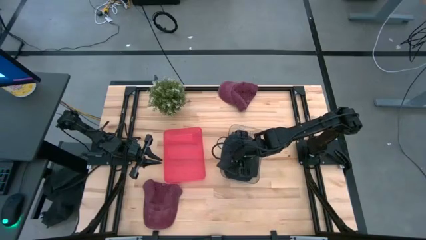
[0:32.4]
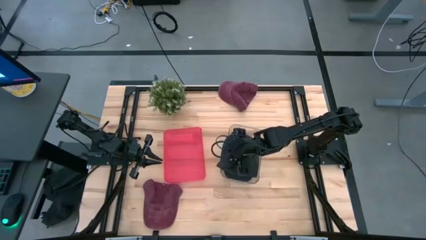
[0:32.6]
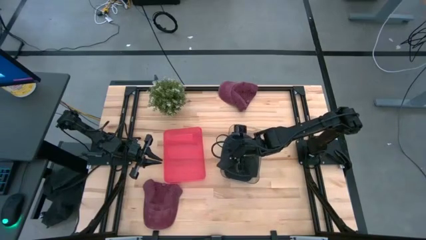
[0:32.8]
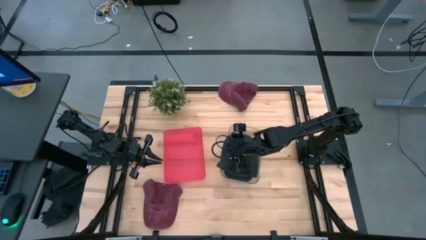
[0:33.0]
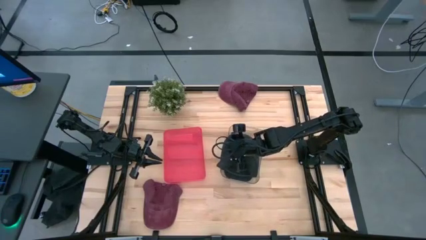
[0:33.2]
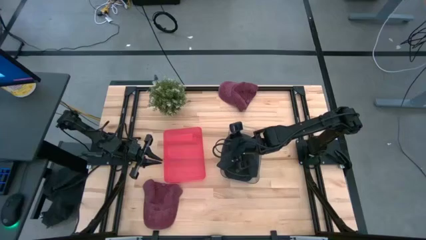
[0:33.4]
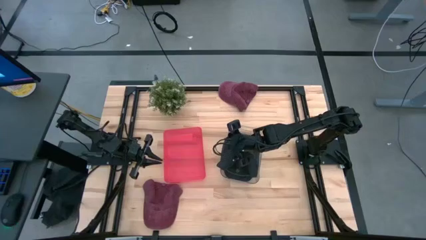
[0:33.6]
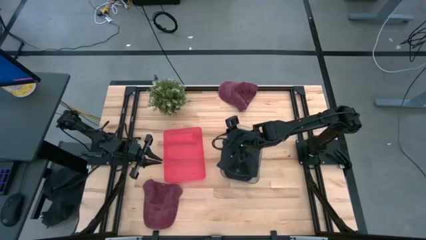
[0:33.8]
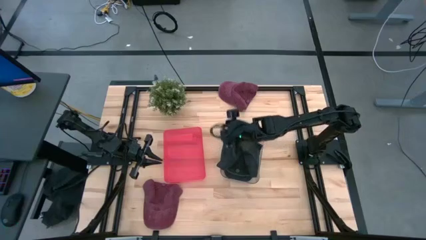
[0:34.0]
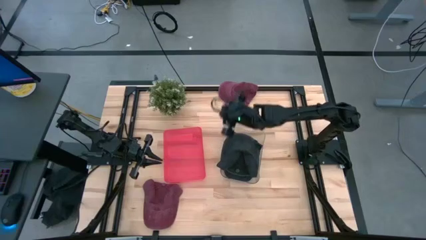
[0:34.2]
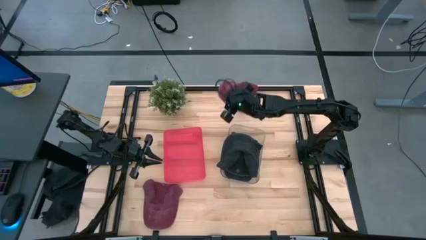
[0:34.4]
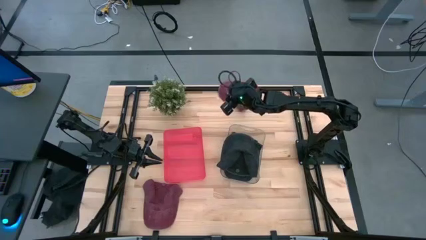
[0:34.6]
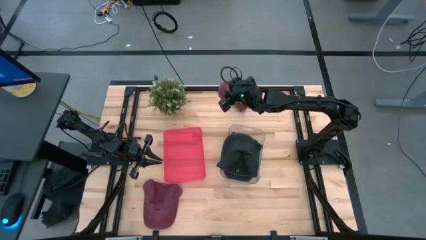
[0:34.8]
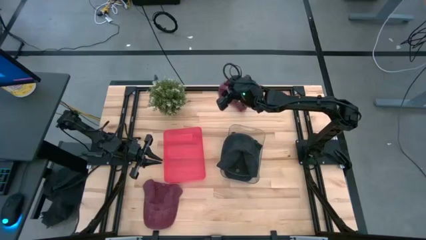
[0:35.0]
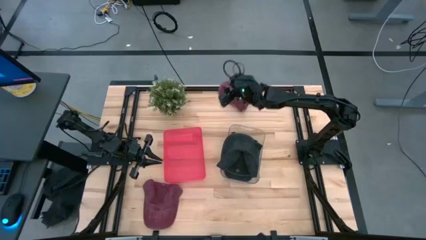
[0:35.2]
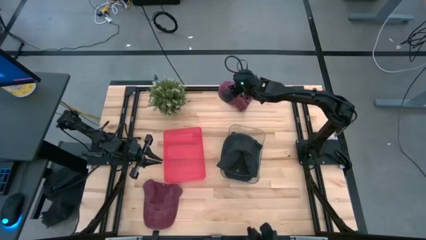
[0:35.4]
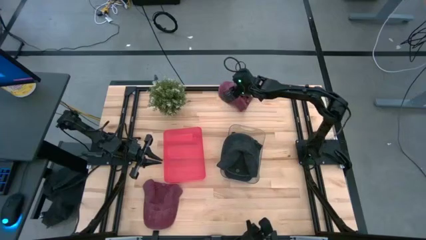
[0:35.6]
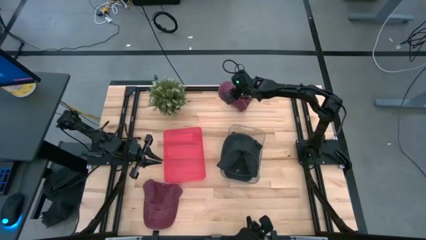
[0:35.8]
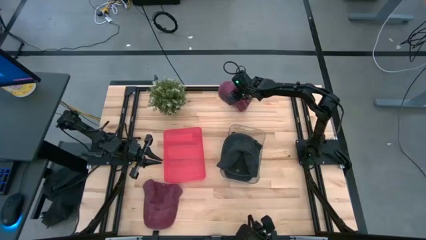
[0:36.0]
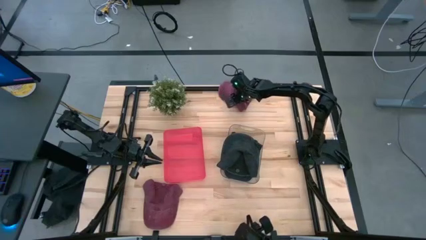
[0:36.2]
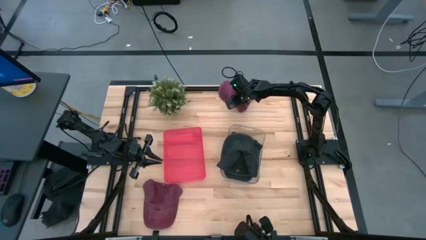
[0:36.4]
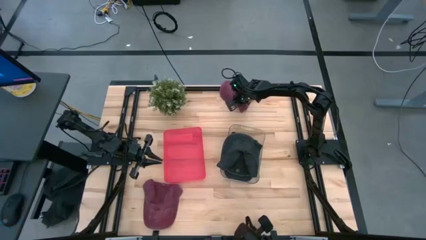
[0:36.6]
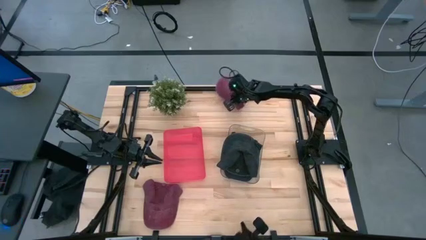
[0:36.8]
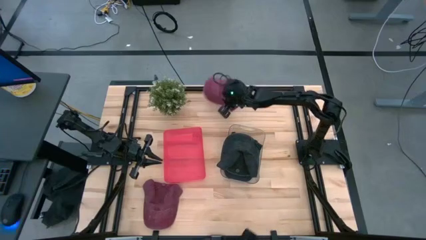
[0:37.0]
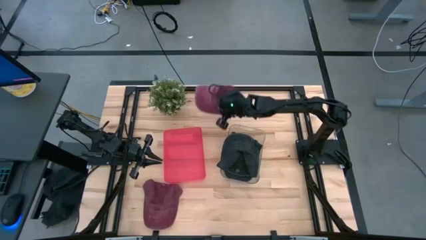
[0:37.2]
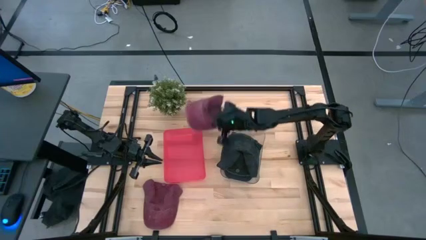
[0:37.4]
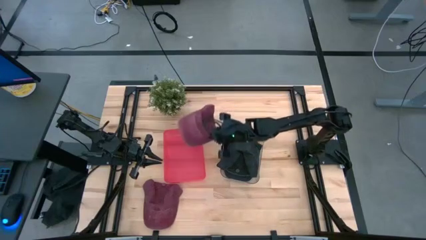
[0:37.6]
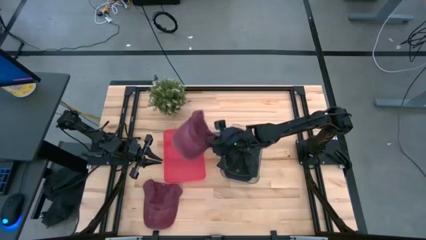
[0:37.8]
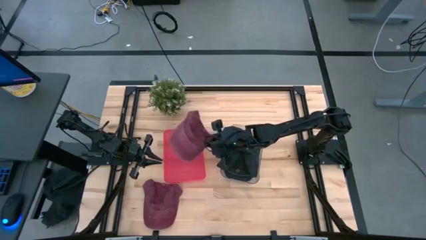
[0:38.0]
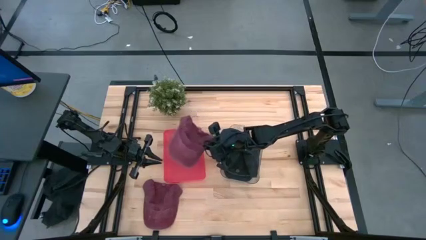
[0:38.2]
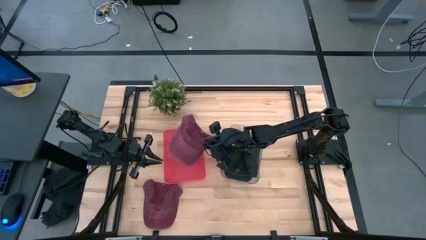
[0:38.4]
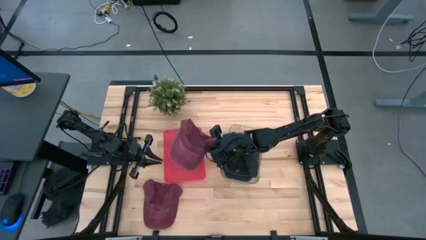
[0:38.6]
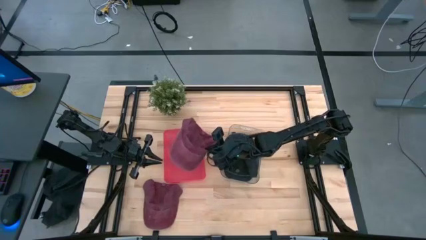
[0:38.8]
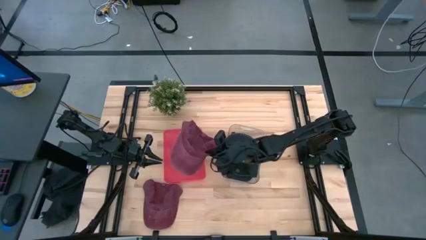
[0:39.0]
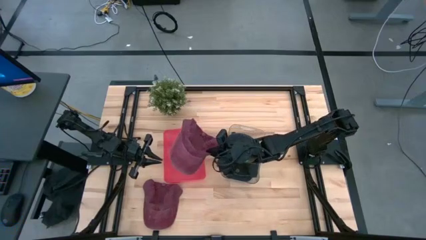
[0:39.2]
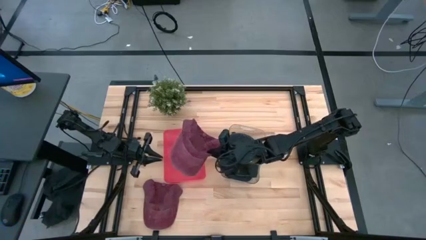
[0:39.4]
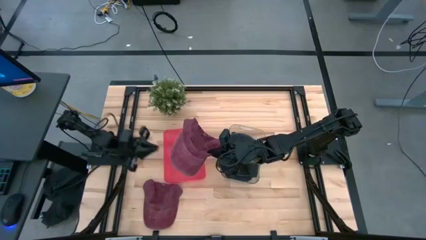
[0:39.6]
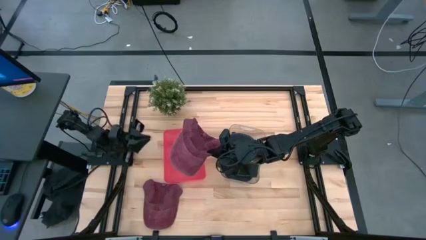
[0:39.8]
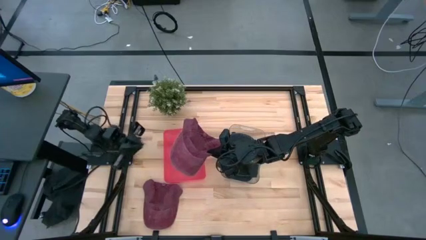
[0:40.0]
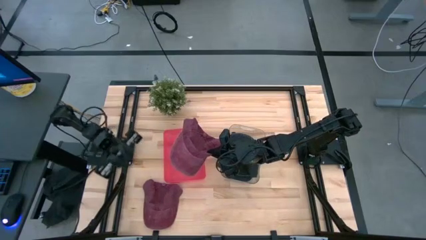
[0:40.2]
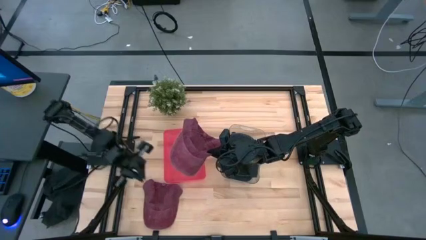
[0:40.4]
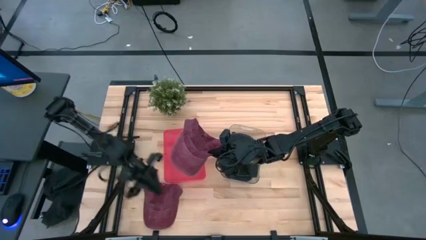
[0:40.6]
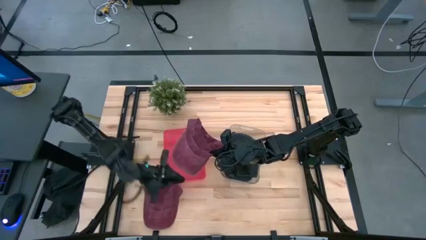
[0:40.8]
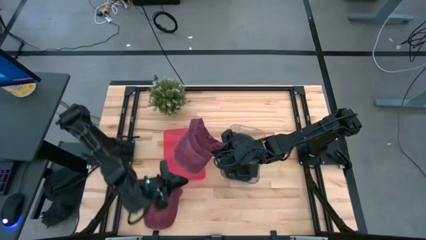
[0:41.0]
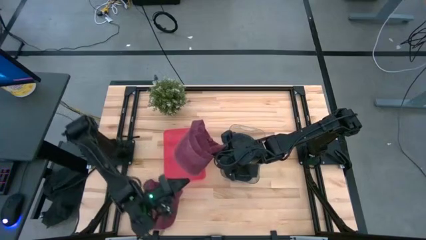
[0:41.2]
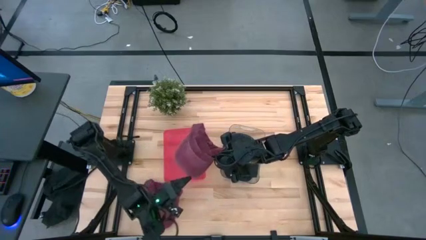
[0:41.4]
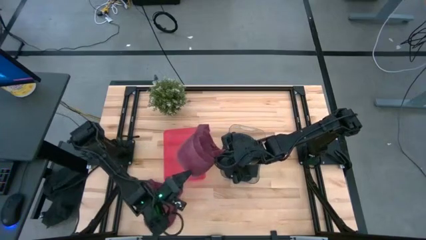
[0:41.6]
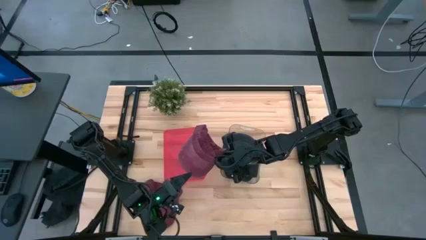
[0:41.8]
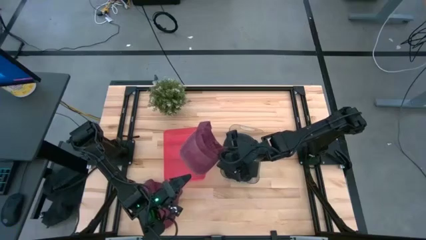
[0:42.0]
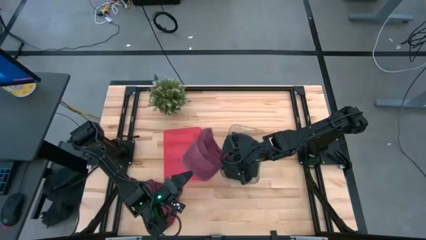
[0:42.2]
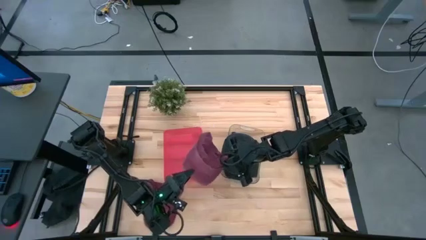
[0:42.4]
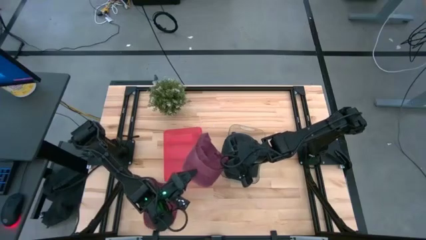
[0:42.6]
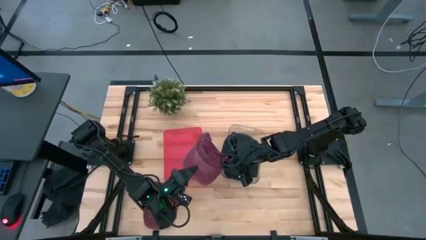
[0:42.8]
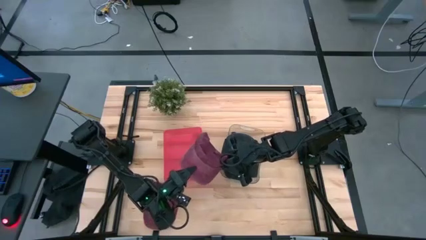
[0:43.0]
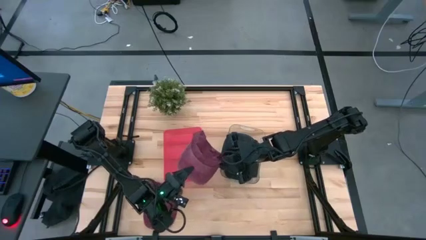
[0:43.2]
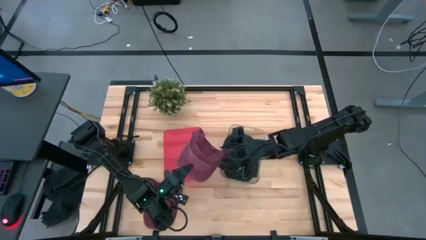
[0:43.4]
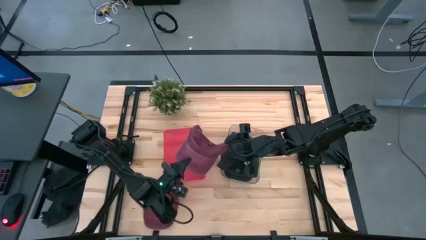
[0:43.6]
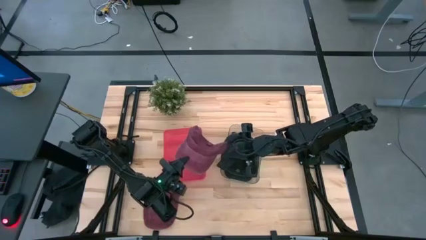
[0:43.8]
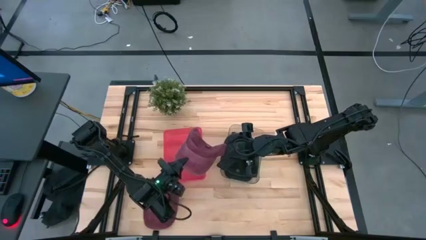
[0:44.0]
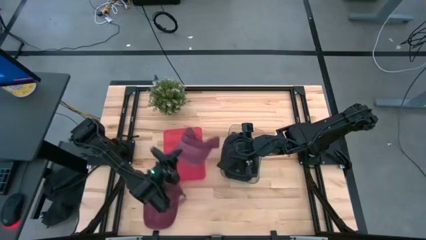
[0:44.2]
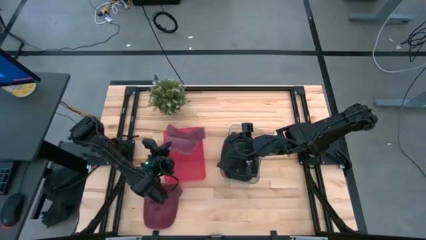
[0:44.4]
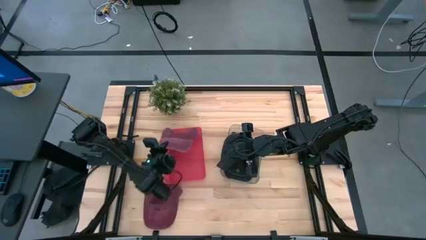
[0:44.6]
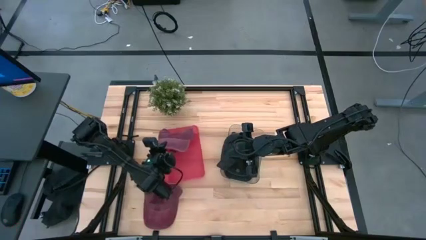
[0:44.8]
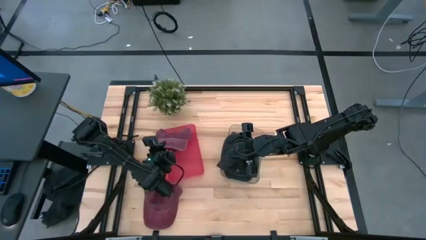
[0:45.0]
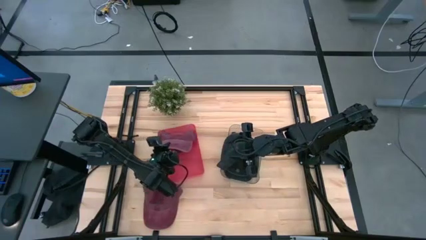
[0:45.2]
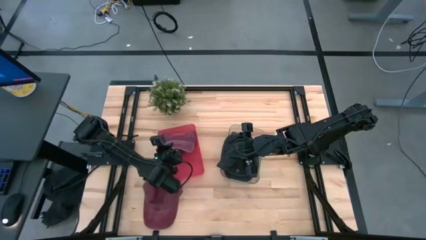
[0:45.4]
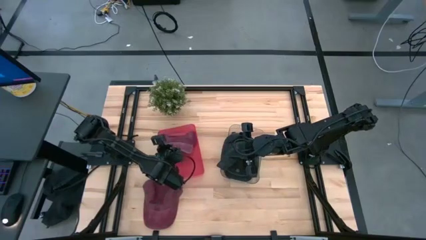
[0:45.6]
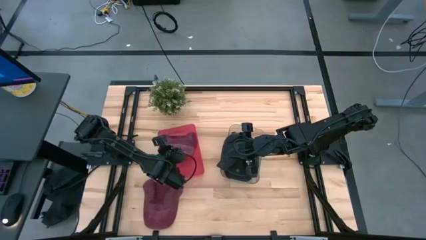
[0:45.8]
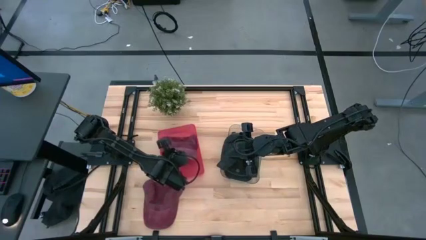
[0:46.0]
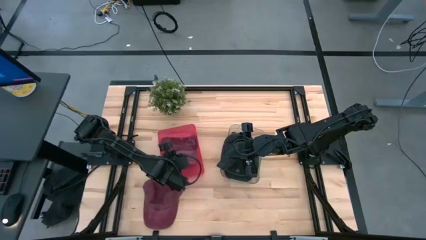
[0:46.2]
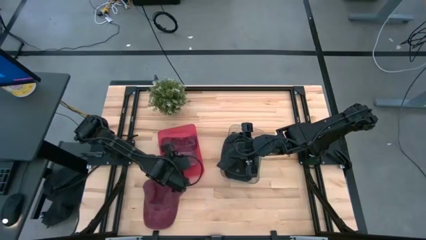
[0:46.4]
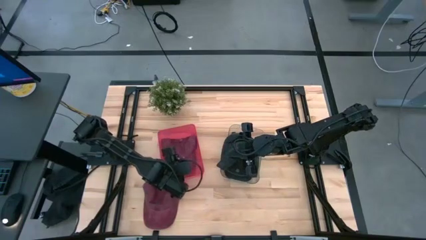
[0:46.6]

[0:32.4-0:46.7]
Task: Pick & Place hat
Put the top maroon cap into the red bin

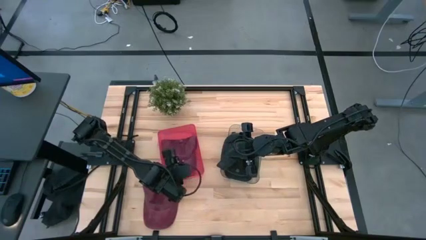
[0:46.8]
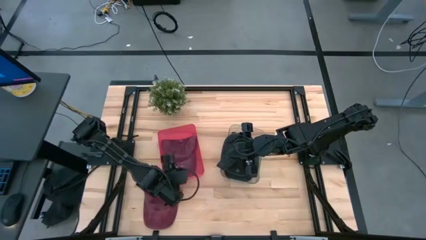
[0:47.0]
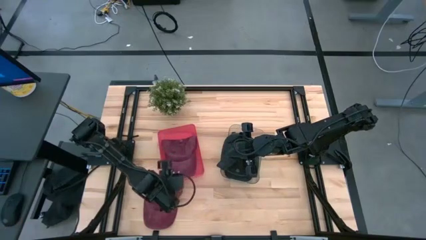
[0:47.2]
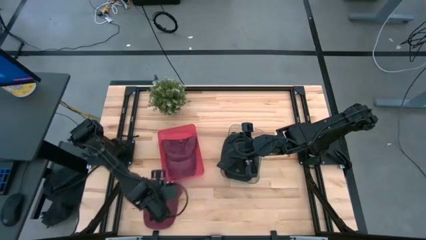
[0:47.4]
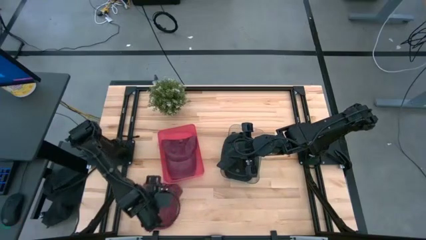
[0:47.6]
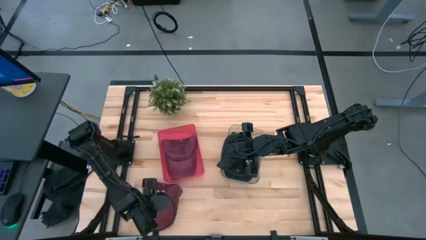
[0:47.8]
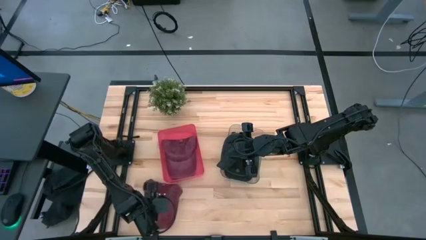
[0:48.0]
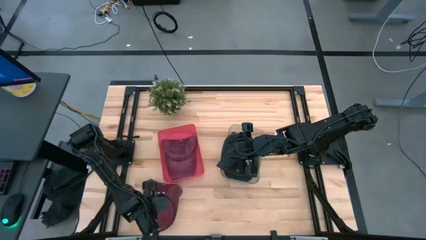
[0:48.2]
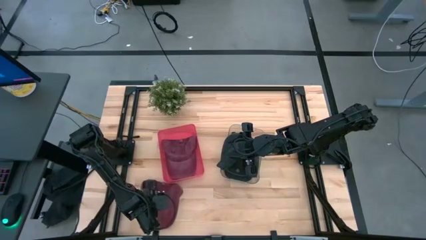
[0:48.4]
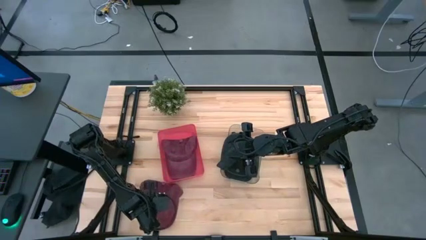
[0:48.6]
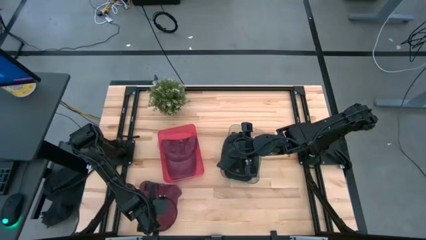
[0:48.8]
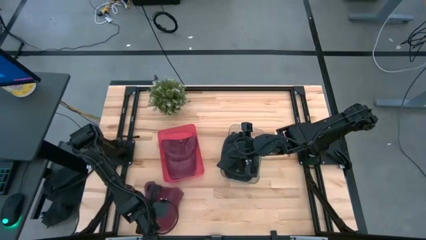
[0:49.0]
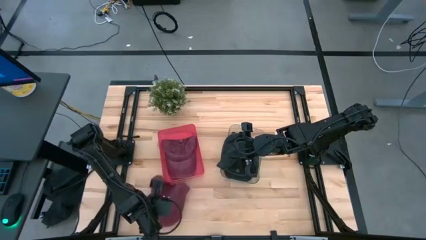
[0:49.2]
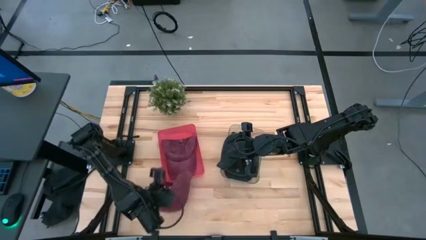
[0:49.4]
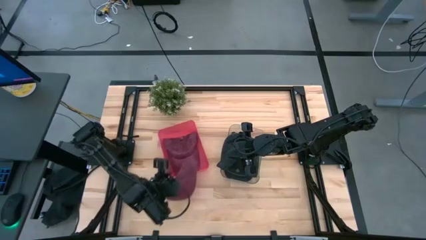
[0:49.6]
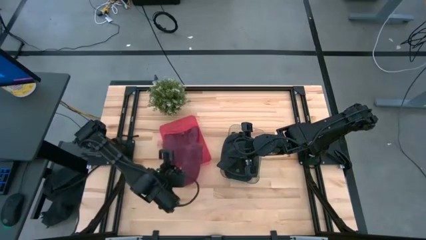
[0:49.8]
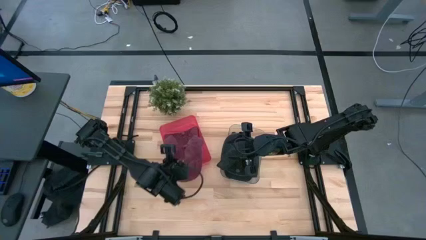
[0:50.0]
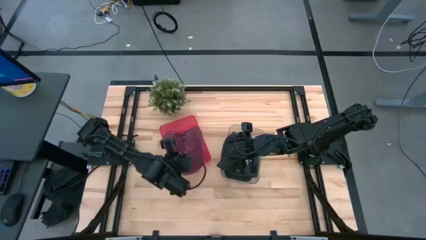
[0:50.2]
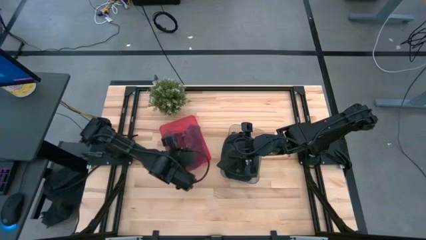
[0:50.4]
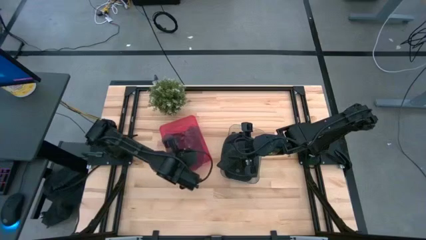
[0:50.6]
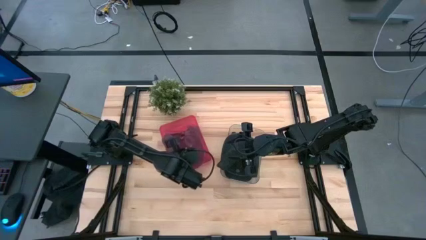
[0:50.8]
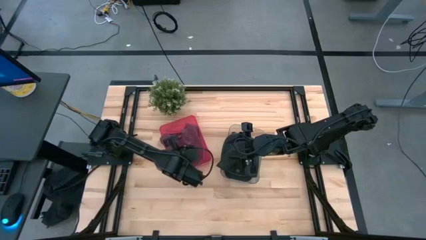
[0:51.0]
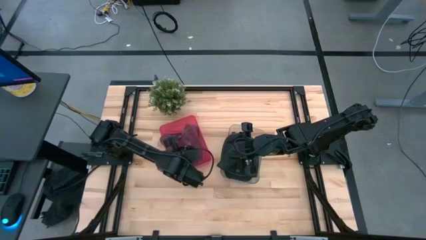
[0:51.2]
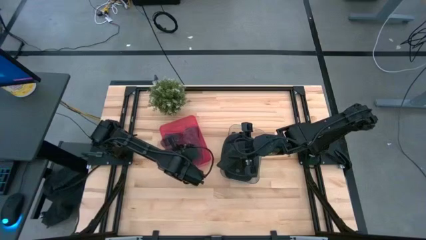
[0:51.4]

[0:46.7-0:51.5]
Put the maroon cap into the red bin
